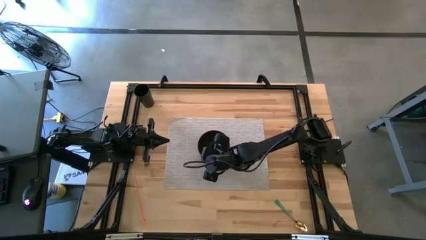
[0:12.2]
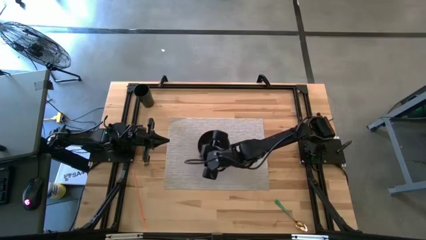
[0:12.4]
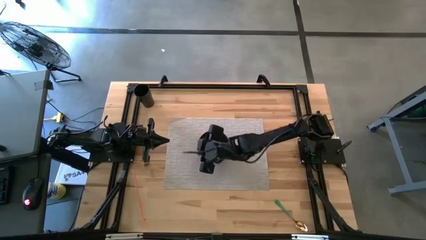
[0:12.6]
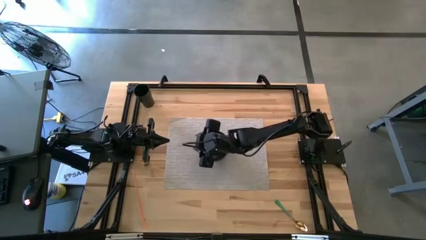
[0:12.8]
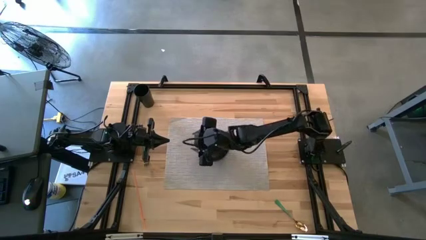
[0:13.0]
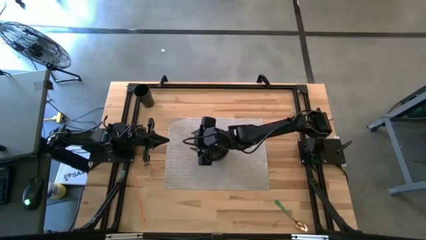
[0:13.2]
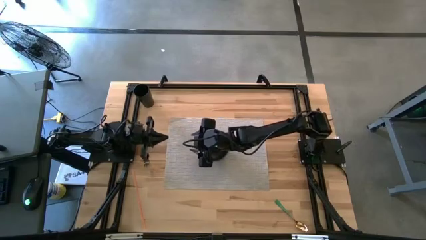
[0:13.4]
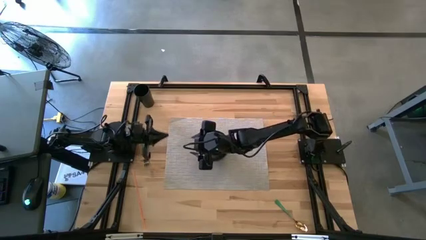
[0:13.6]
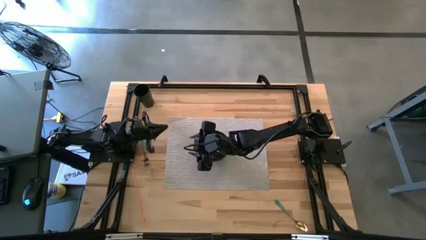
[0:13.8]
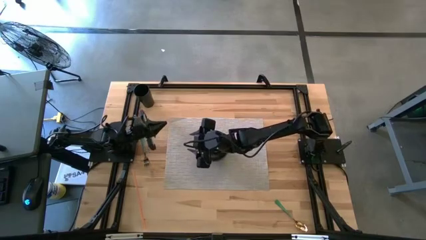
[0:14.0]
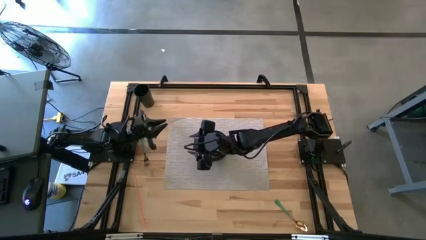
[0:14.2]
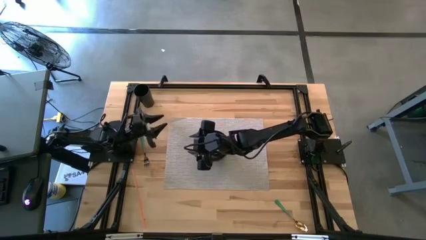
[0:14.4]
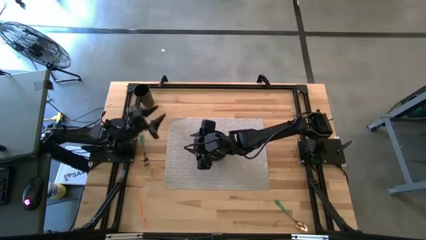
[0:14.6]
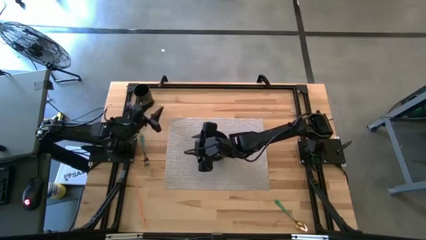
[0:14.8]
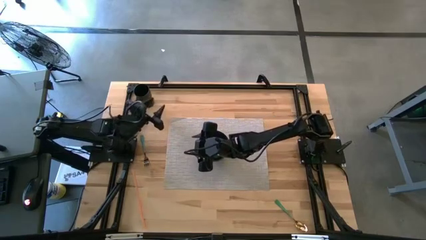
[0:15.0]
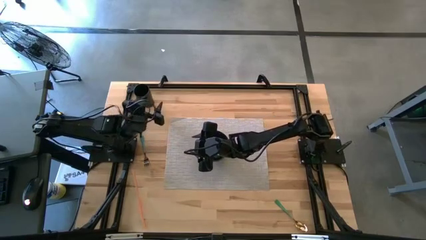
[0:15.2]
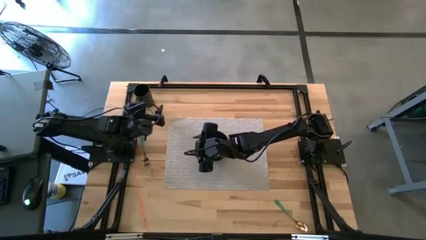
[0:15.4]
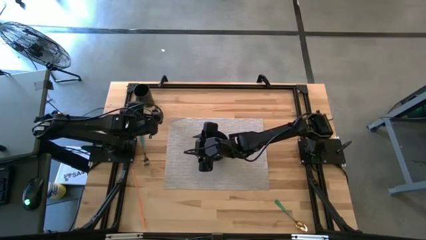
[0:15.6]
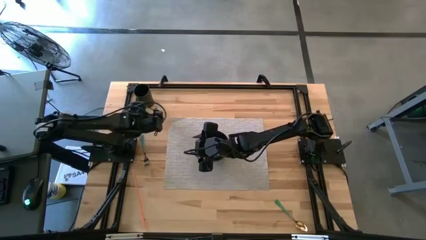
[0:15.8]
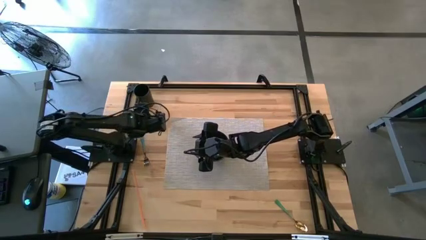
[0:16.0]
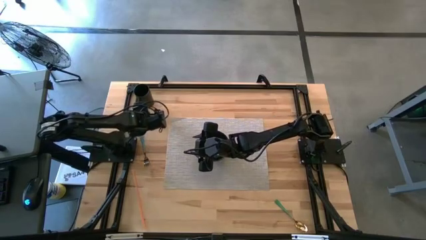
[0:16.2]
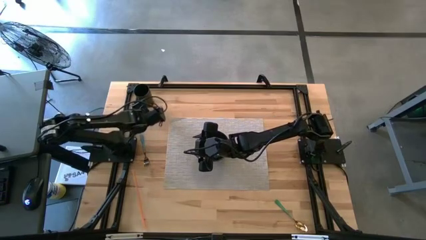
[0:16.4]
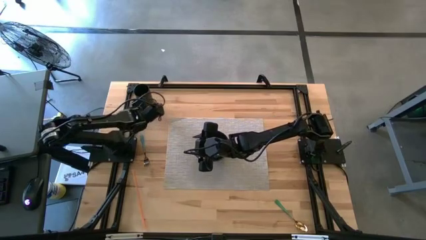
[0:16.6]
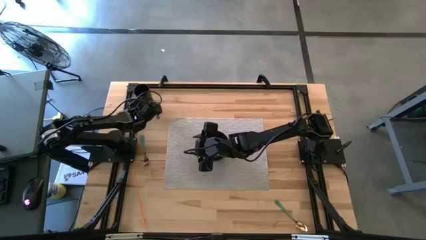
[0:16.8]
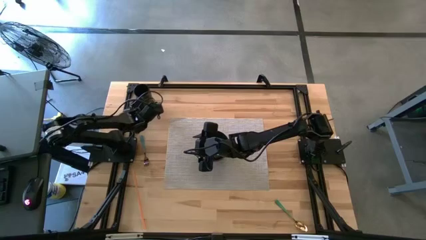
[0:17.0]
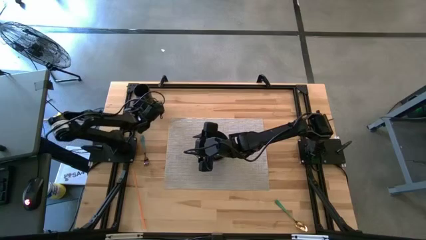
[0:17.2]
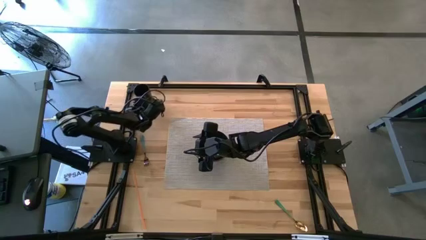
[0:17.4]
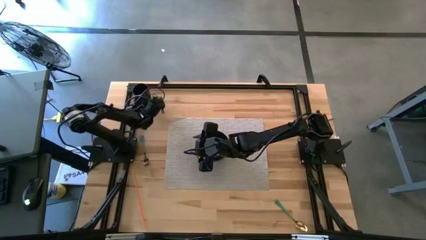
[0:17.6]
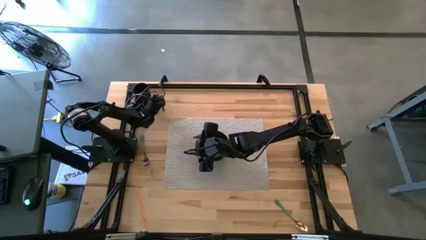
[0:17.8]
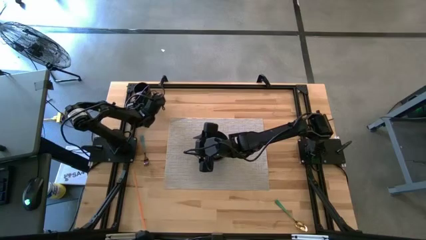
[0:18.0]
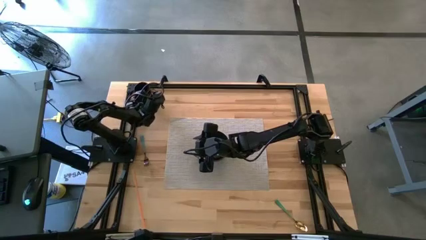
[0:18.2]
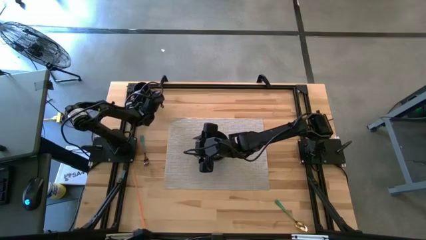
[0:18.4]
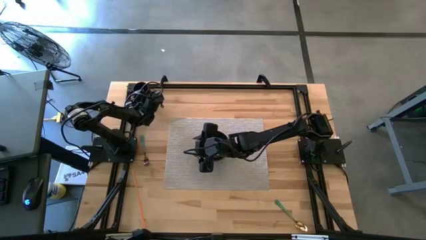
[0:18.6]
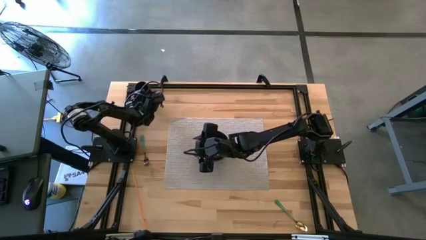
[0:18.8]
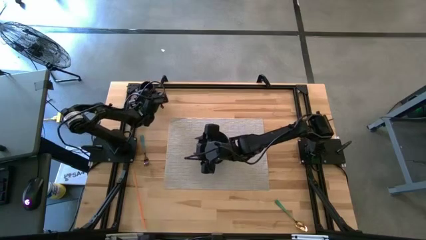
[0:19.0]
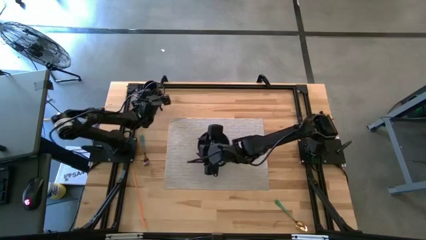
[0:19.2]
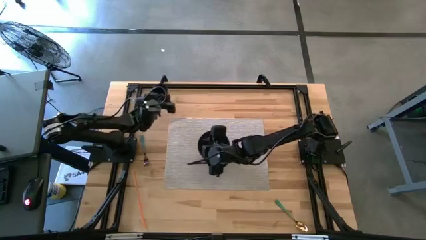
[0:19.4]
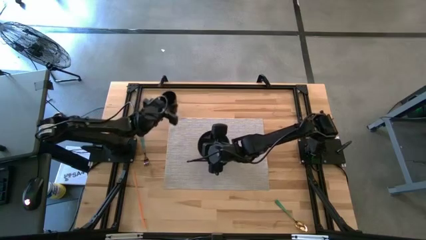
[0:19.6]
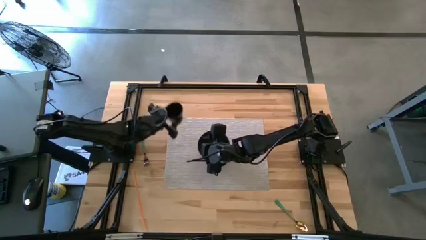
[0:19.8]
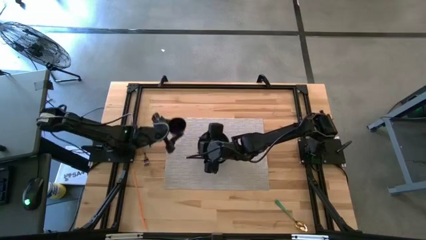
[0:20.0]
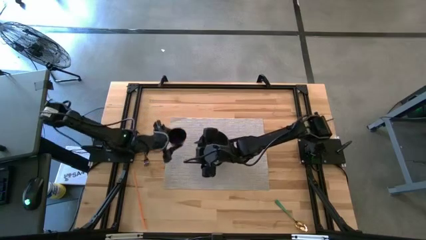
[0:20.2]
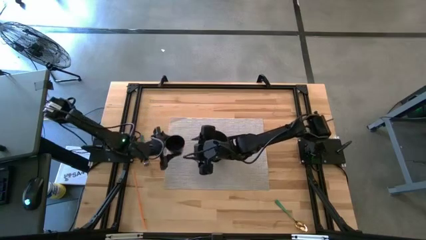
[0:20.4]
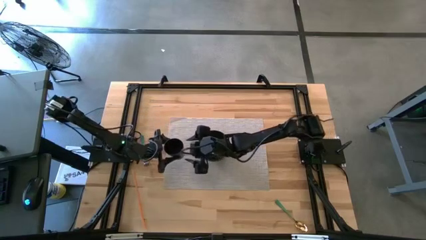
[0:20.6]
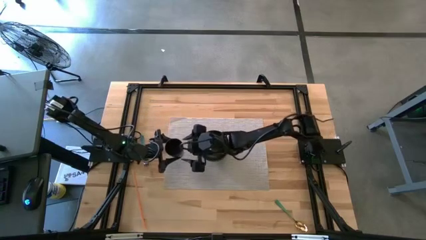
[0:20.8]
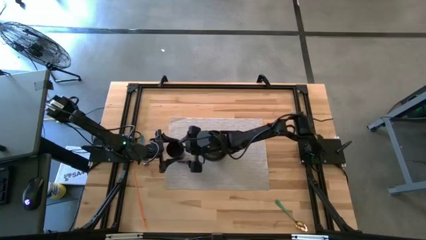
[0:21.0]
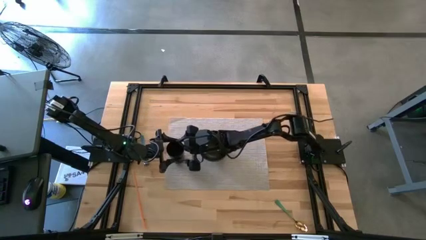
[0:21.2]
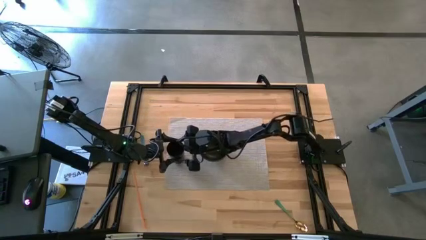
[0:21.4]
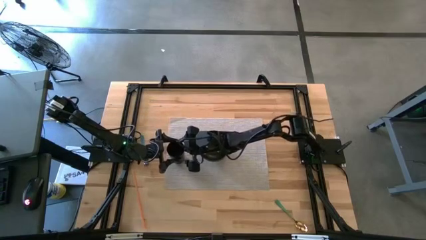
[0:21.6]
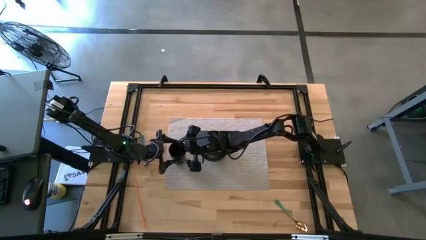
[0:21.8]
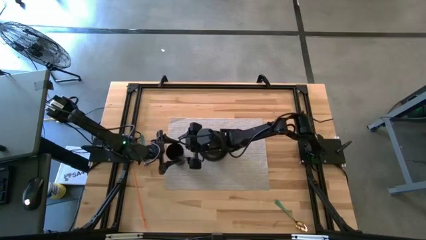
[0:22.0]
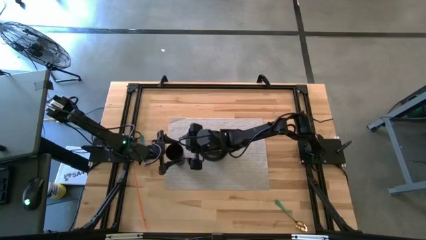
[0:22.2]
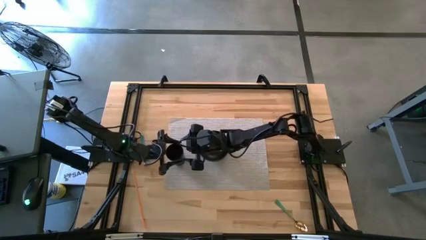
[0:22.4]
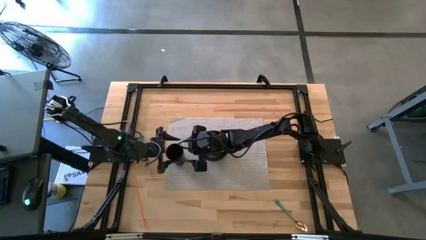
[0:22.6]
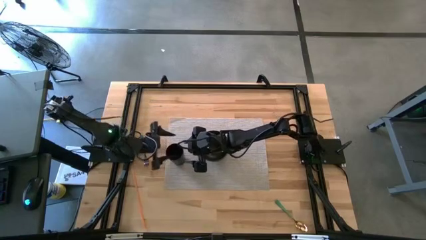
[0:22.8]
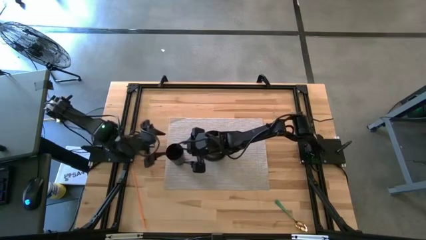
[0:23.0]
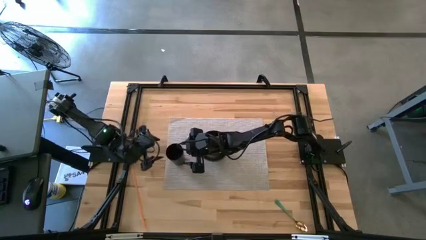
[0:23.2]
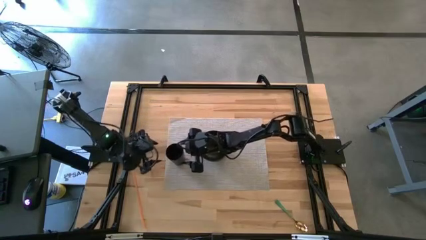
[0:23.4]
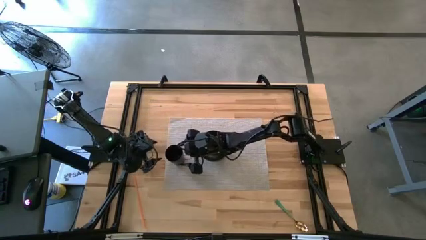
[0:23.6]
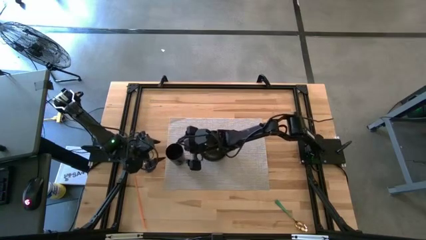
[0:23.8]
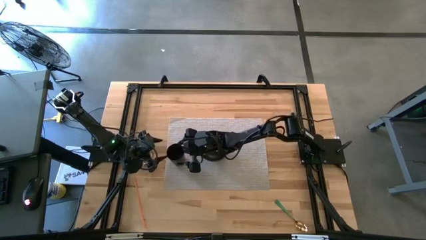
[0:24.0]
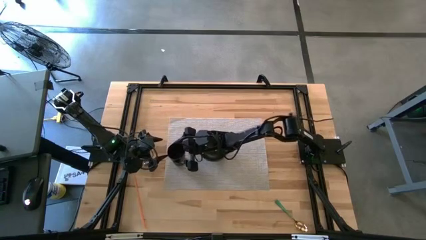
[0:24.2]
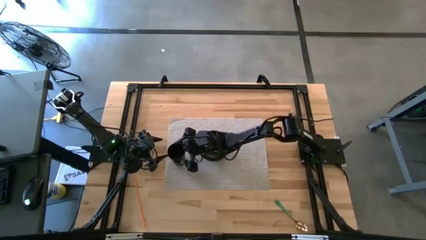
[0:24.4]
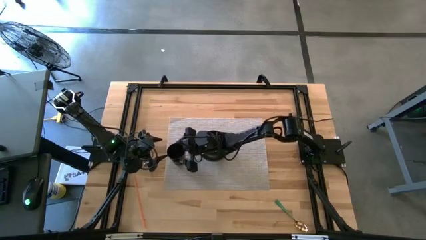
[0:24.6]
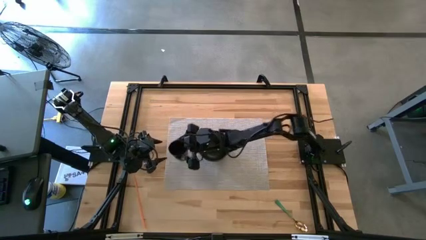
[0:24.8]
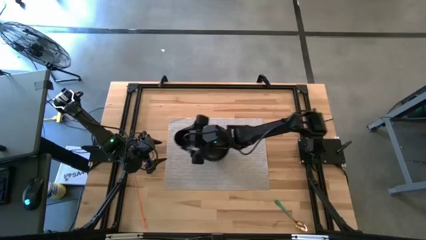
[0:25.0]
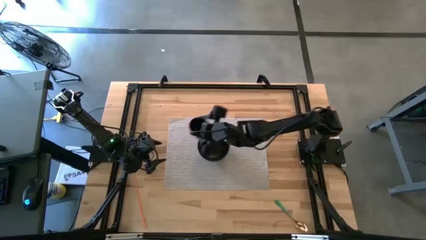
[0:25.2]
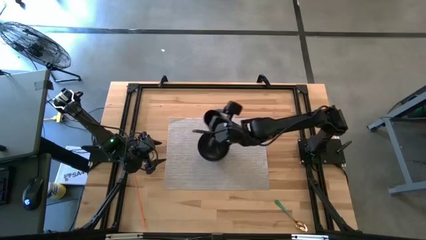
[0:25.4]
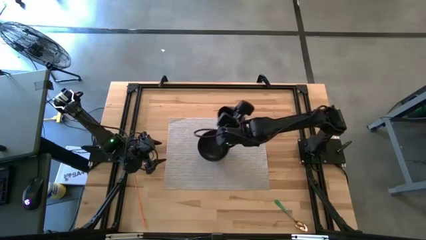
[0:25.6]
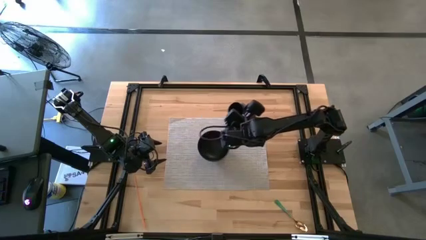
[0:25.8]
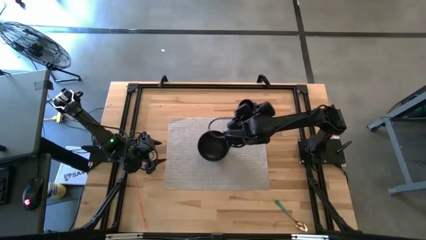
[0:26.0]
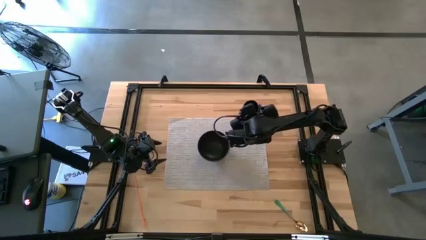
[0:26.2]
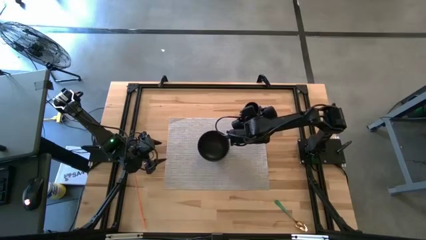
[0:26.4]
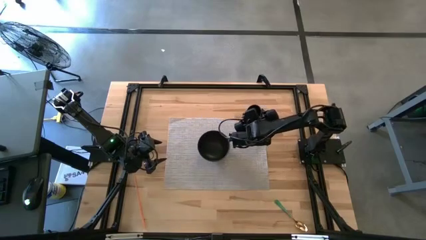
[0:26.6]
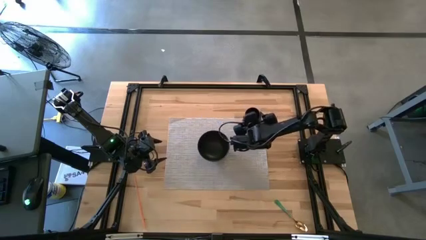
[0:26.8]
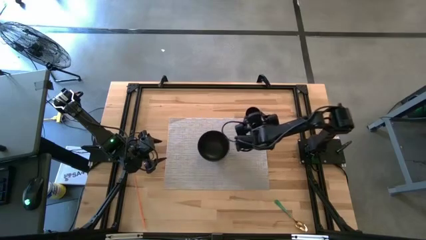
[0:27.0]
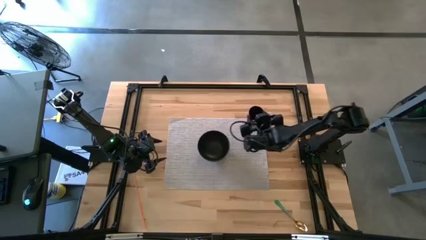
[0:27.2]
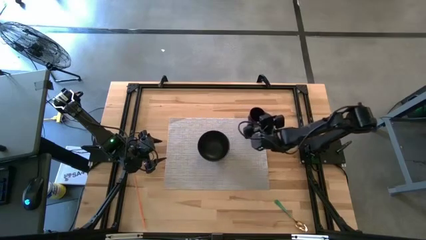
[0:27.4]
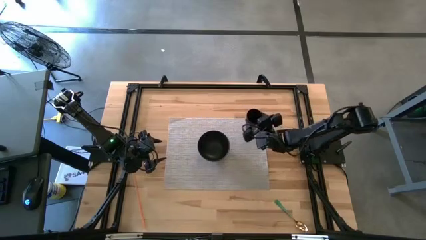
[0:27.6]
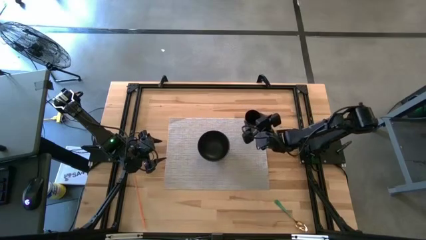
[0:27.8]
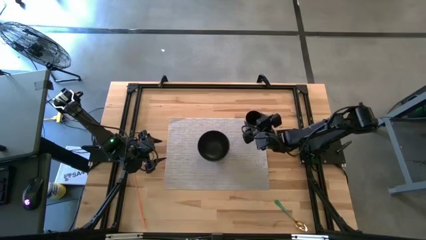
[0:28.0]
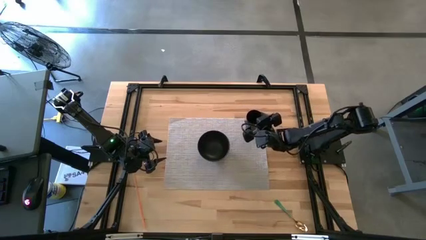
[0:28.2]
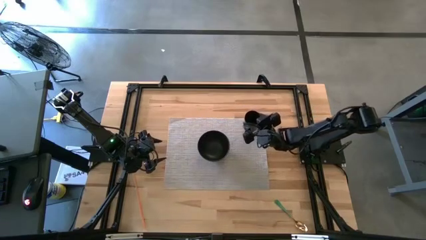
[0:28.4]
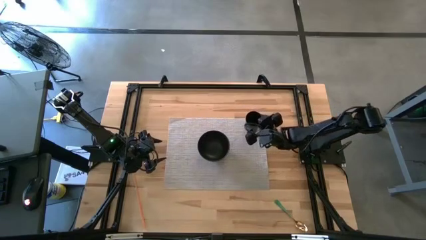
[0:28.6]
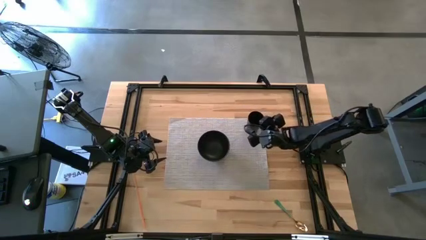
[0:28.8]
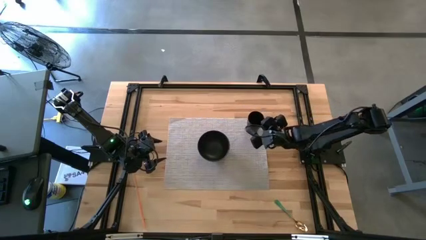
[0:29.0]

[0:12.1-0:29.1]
Task: Pick & Place Utensil
Put the black cup on the upper right of the black bowl on the gray mat
